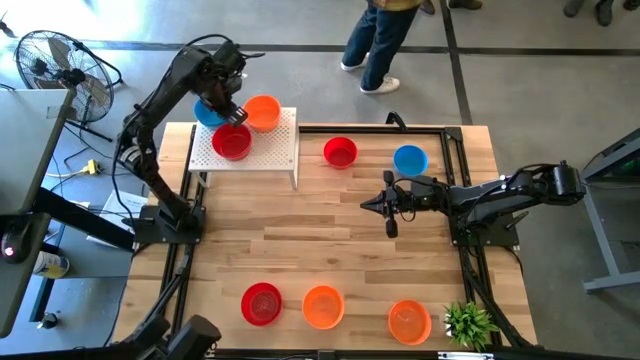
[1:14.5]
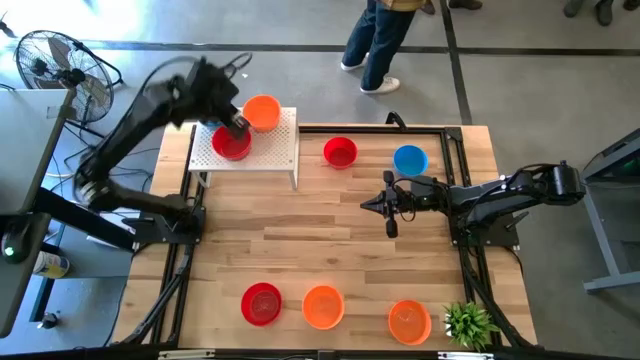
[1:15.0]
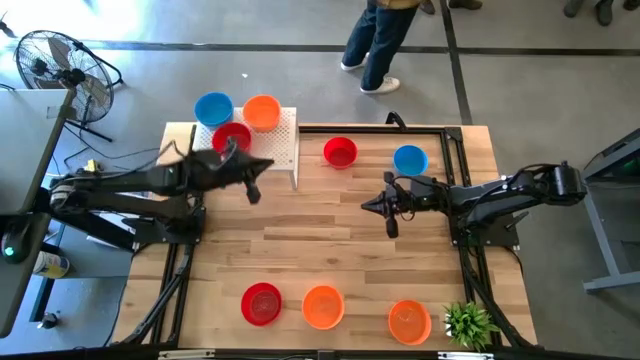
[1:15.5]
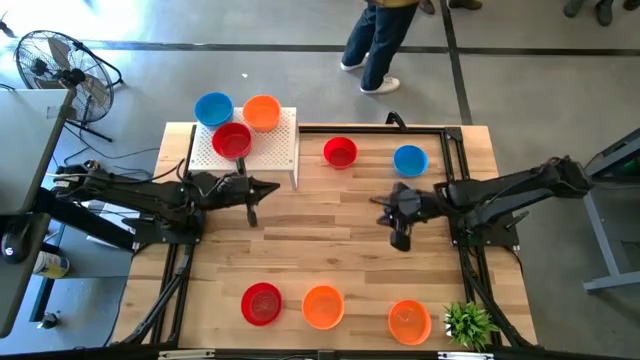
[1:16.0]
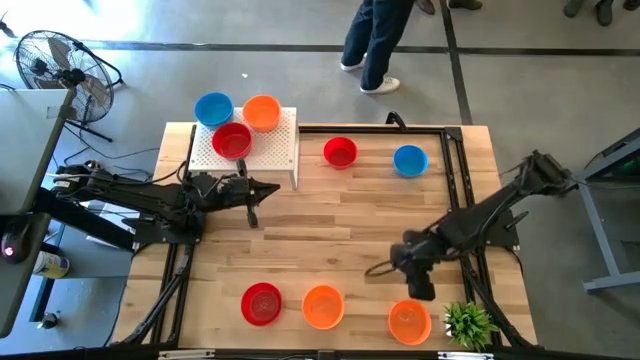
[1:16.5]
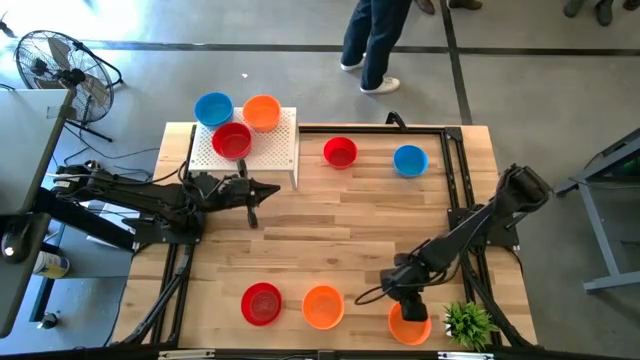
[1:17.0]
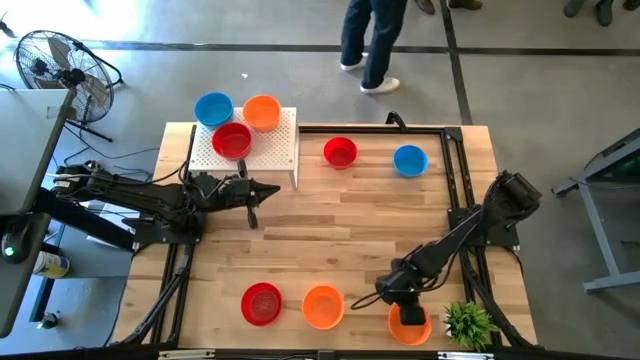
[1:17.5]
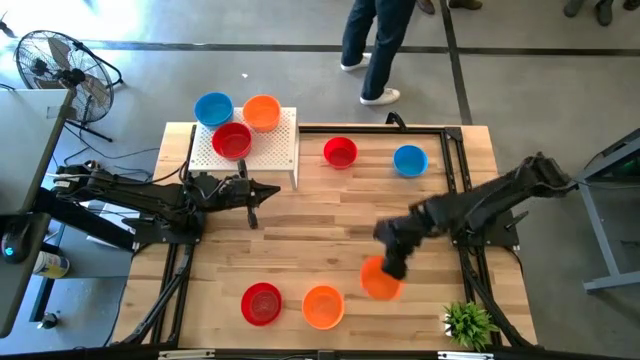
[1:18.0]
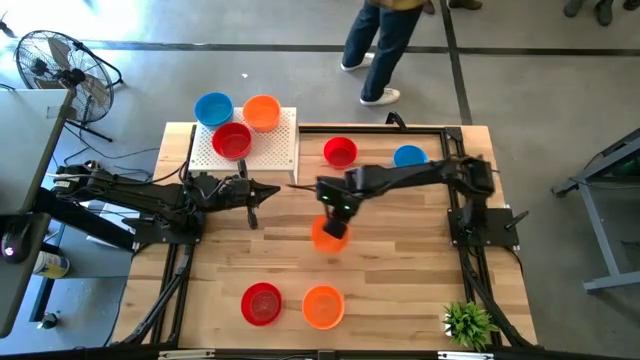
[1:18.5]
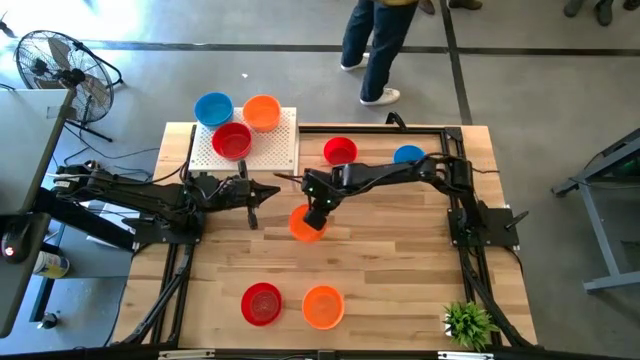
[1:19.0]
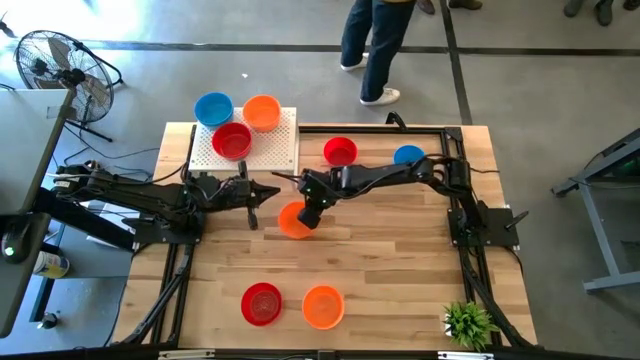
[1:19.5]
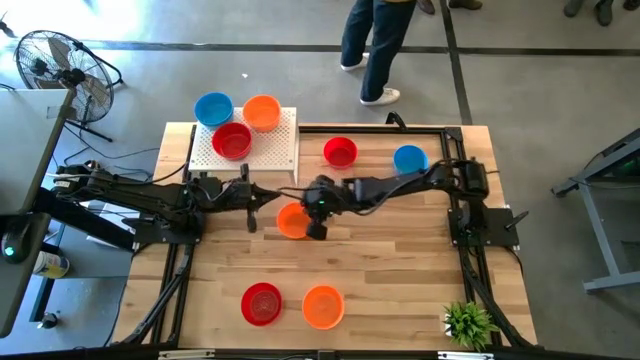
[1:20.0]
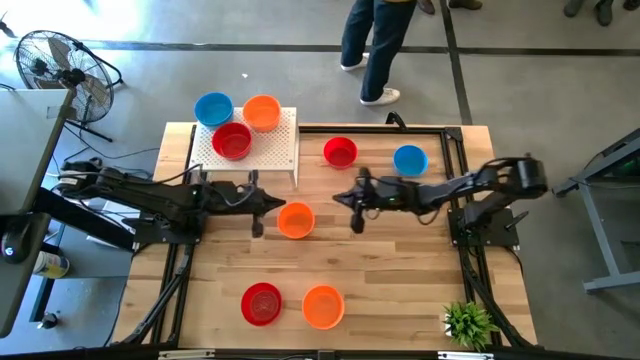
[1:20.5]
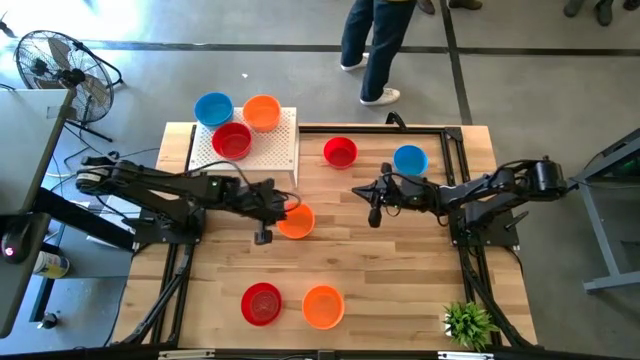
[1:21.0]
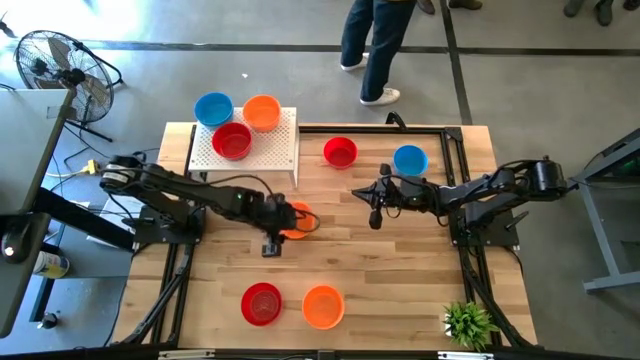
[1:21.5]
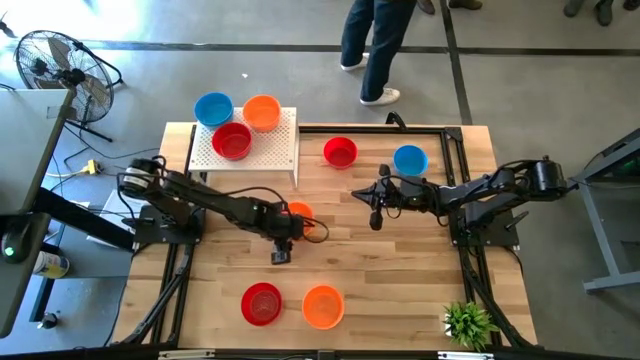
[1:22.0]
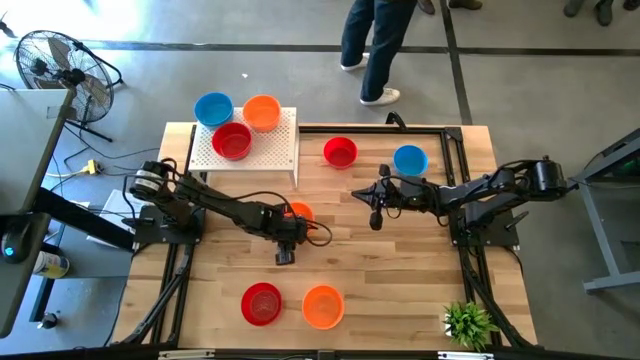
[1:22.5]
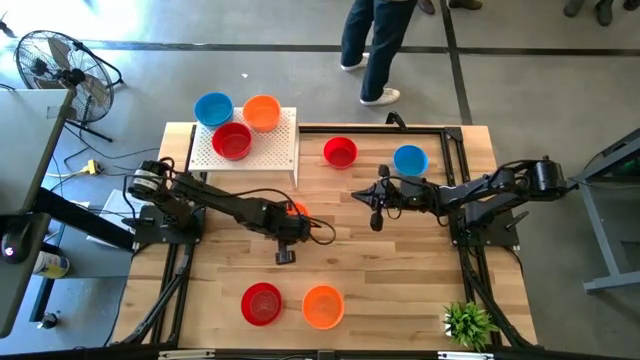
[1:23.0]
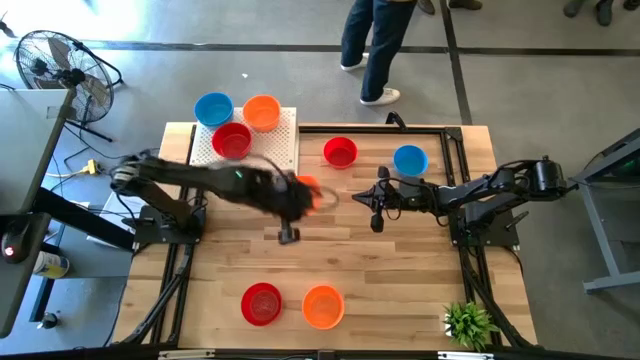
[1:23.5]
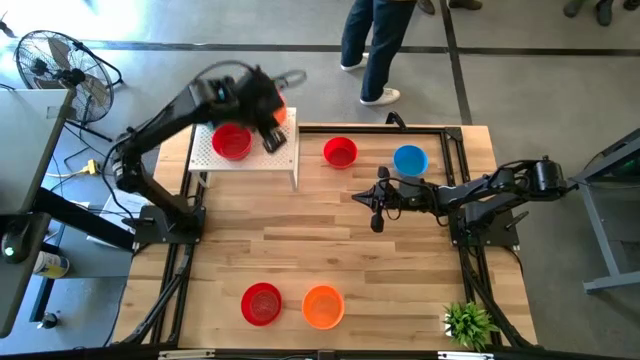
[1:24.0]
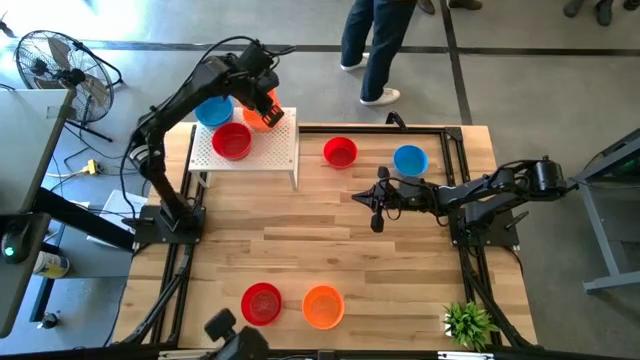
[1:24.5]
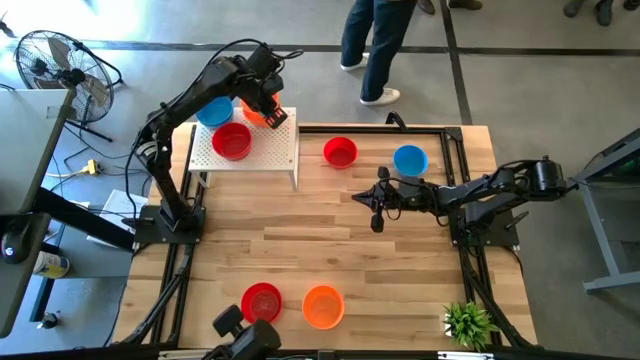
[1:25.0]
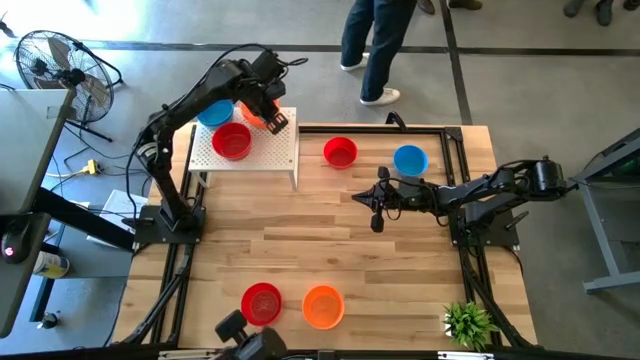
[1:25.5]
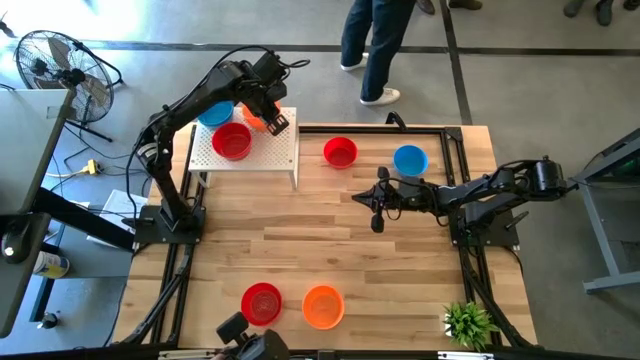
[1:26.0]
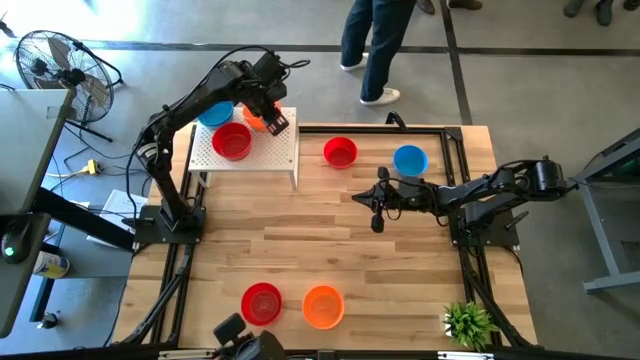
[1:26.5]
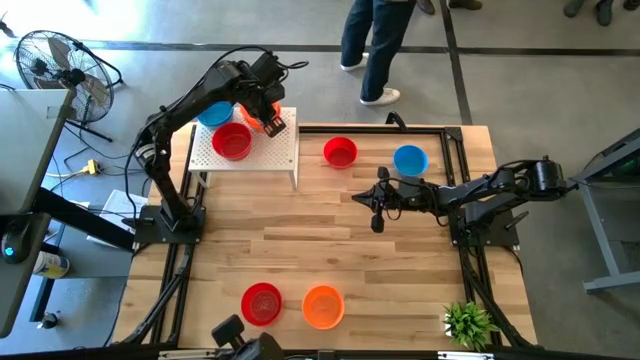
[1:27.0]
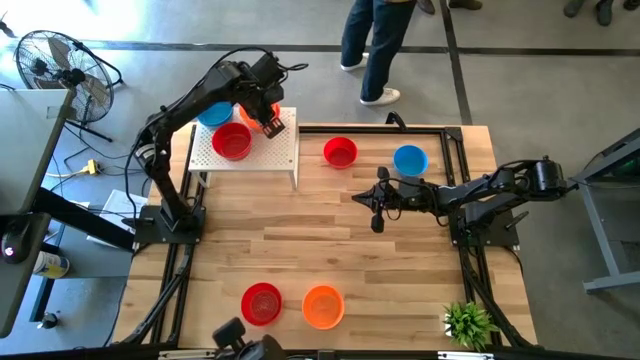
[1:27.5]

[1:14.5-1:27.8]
Task: Pick & Place Mini bowls
Stack the orange bowl on top of the orange bowl on the shelf

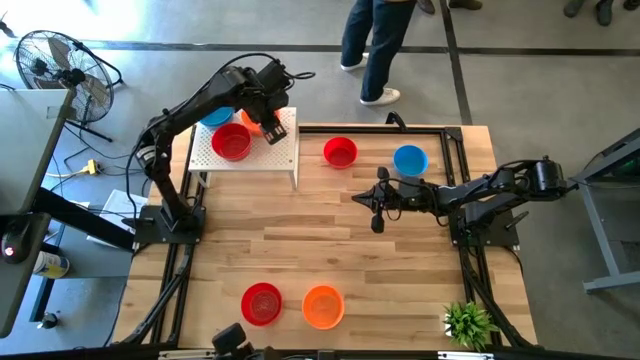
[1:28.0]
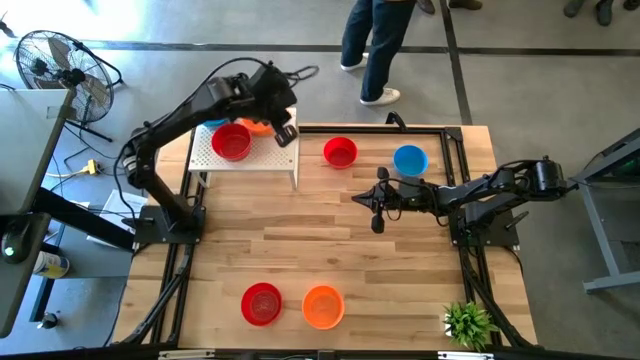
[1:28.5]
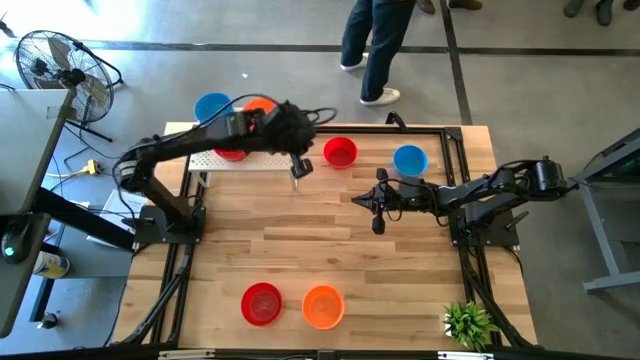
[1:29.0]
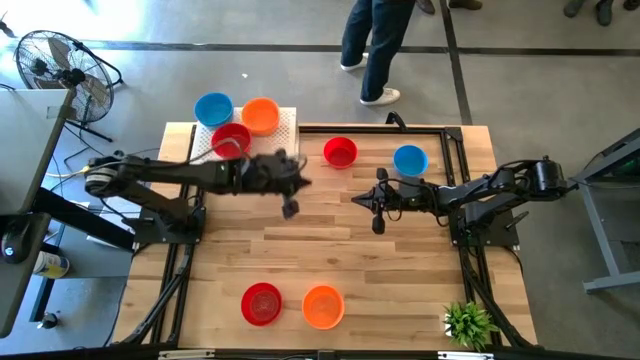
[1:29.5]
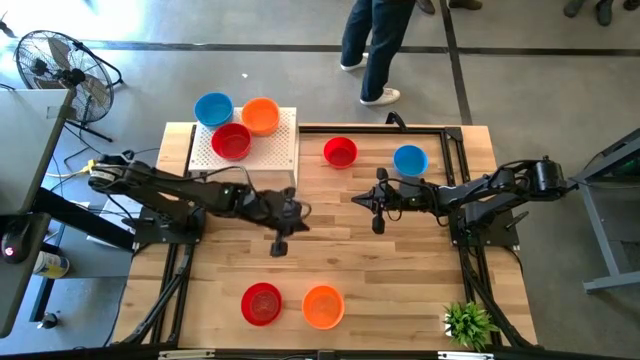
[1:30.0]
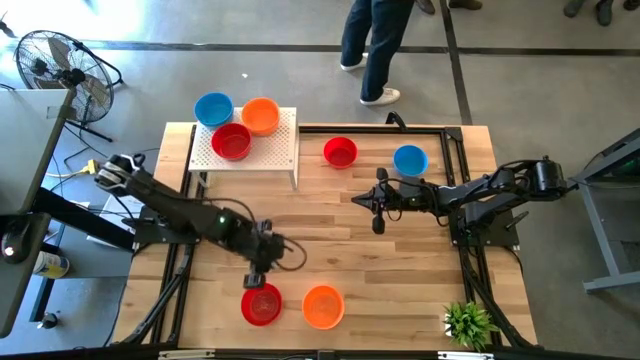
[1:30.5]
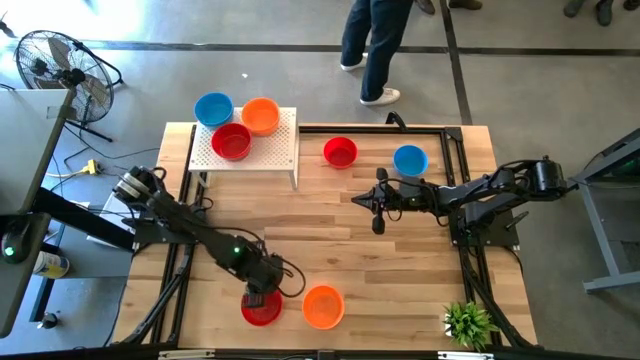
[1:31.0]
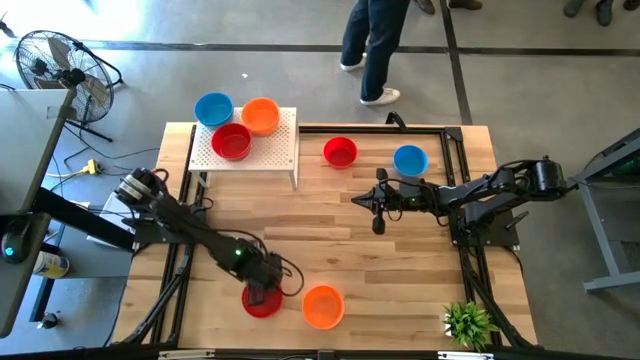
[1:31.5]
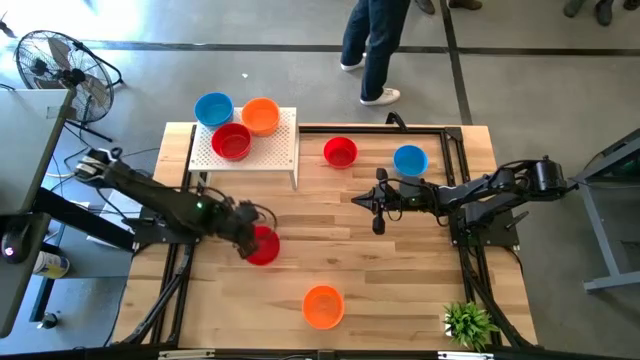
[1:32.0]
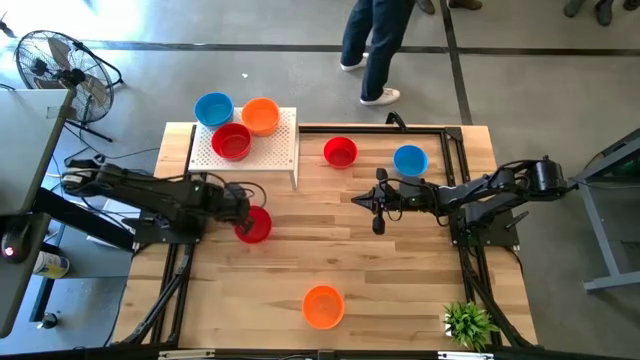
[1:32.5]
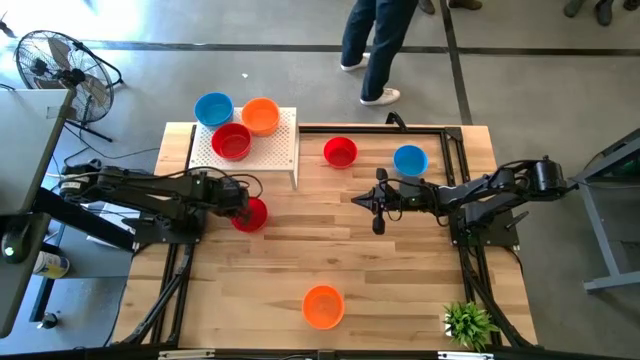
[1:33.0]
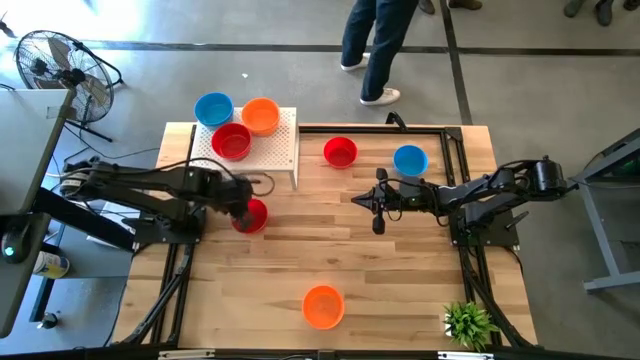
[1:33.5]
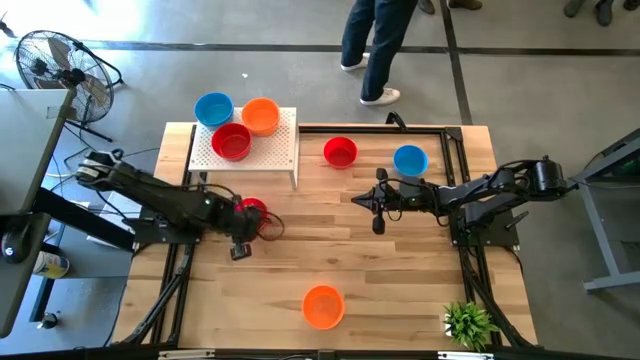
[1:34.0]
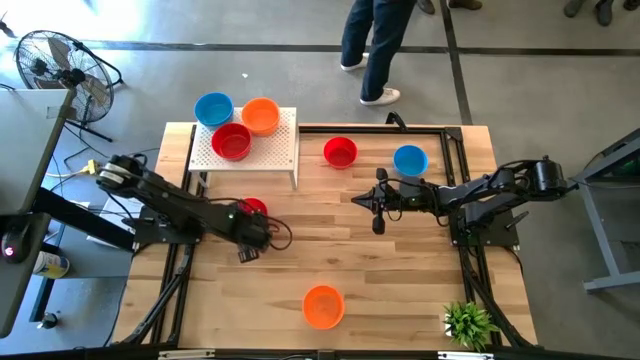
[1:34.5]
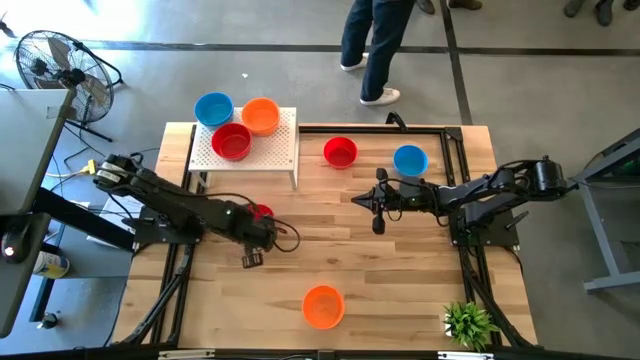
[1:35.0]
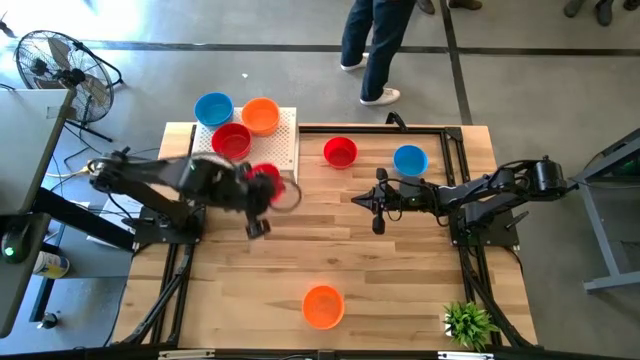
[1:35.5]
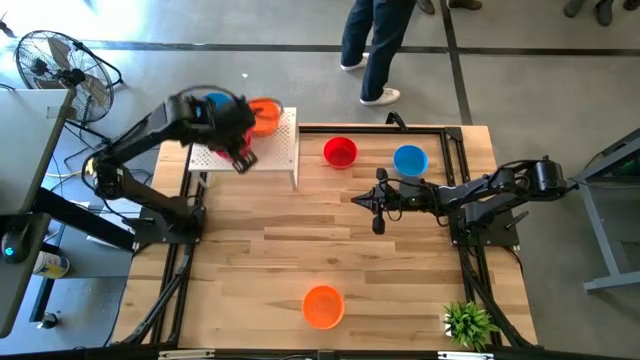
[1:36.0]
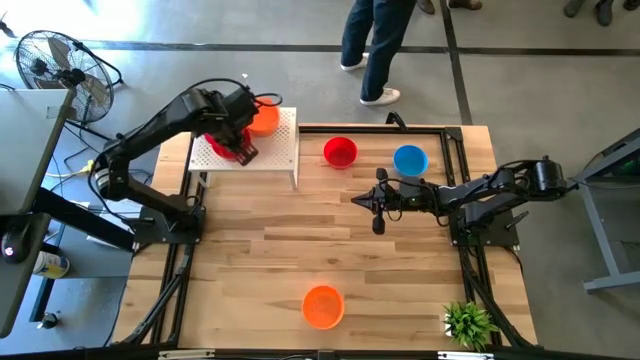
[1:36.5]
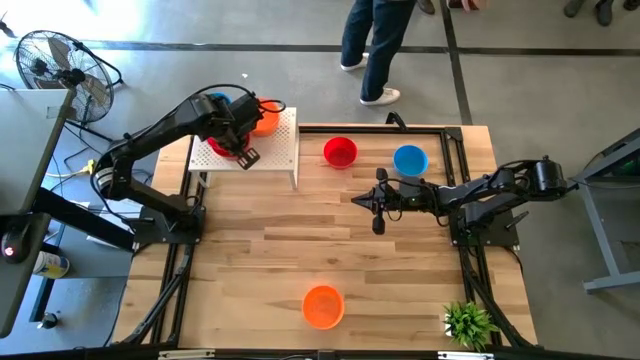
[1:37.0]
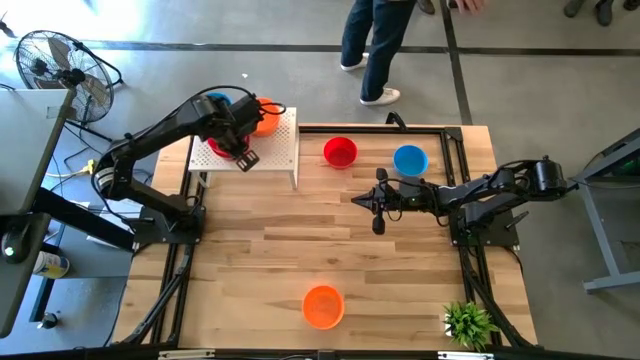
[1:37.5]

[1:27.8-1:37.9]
Stack the red bowl on top of the red bowl on the shelf
